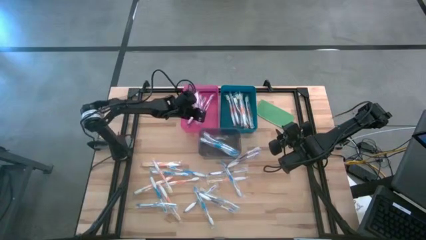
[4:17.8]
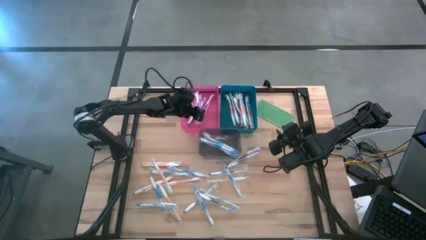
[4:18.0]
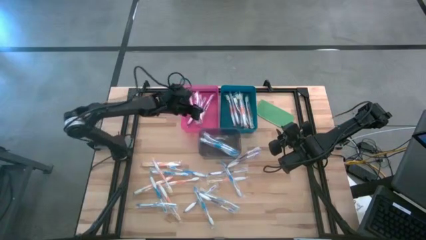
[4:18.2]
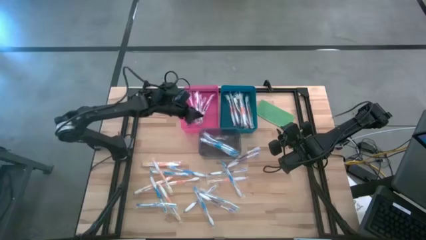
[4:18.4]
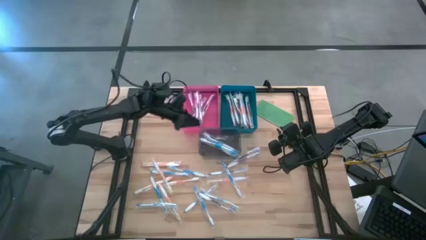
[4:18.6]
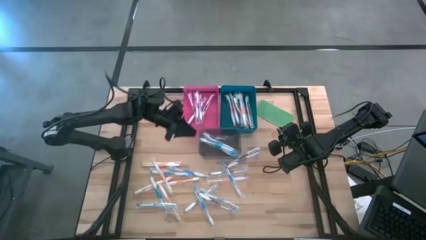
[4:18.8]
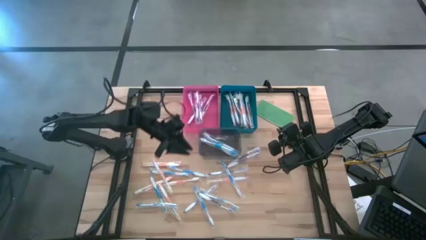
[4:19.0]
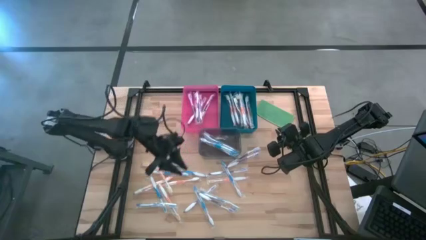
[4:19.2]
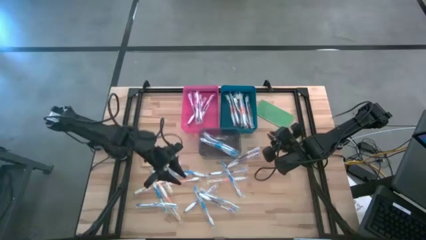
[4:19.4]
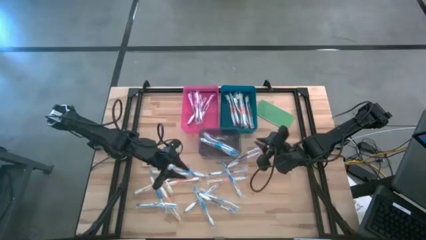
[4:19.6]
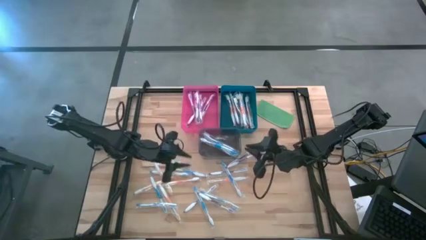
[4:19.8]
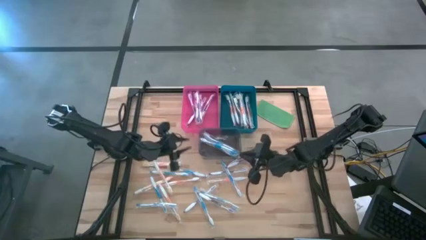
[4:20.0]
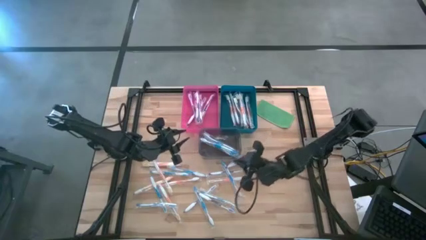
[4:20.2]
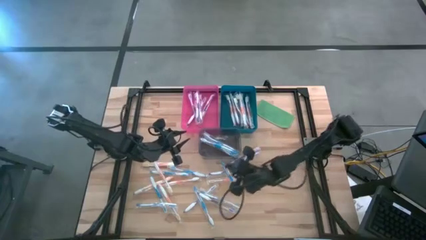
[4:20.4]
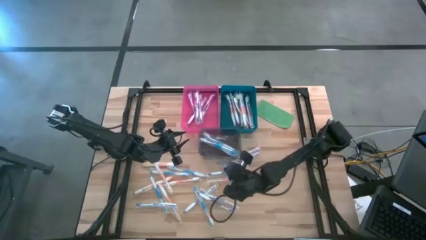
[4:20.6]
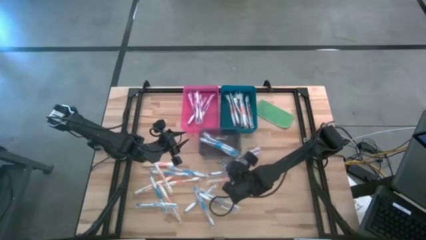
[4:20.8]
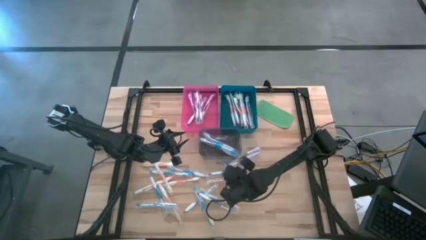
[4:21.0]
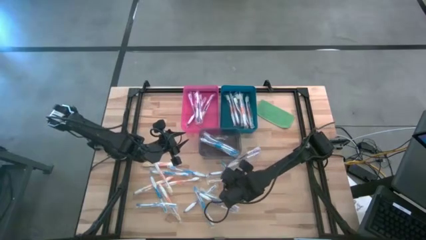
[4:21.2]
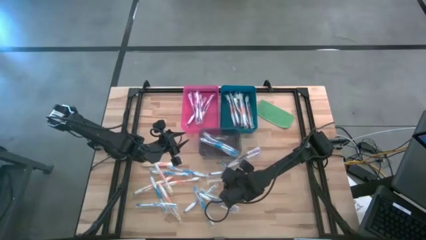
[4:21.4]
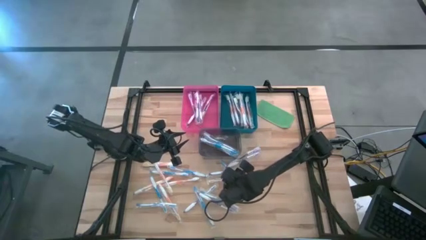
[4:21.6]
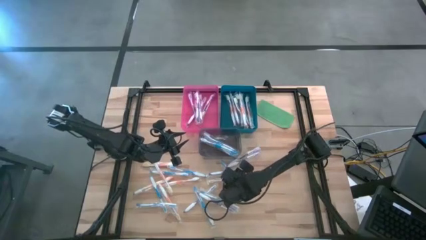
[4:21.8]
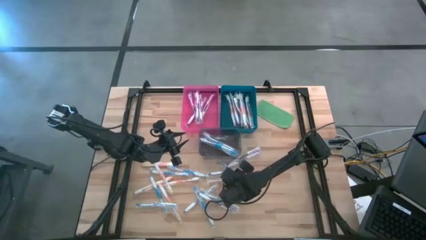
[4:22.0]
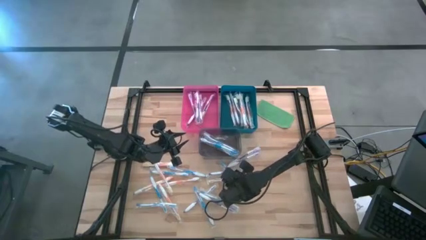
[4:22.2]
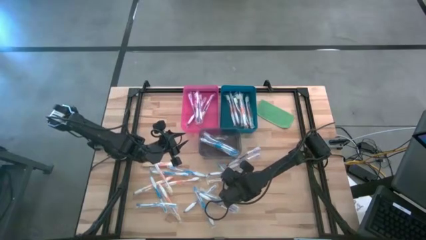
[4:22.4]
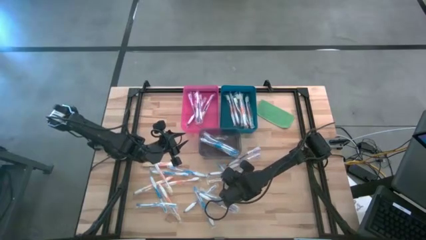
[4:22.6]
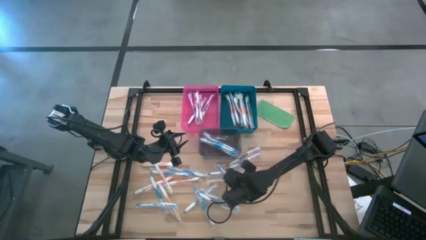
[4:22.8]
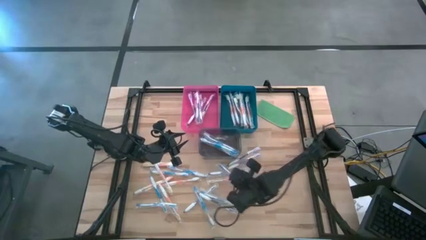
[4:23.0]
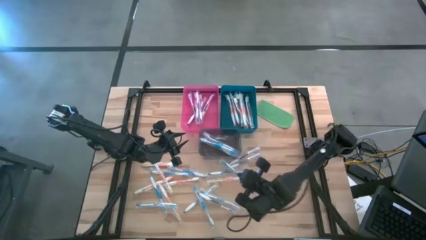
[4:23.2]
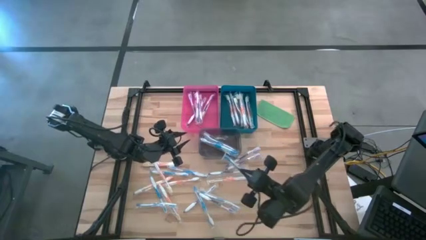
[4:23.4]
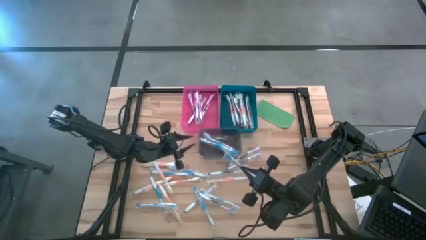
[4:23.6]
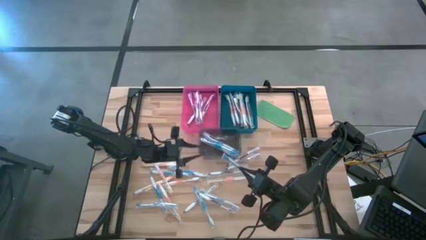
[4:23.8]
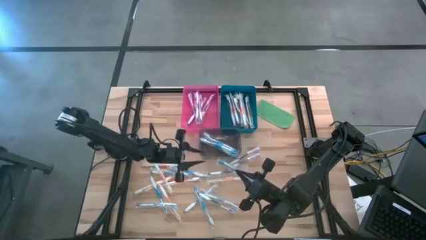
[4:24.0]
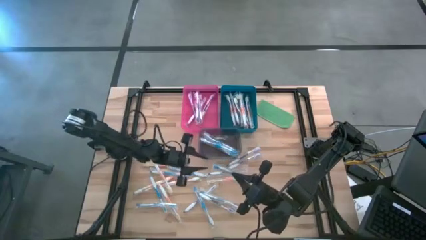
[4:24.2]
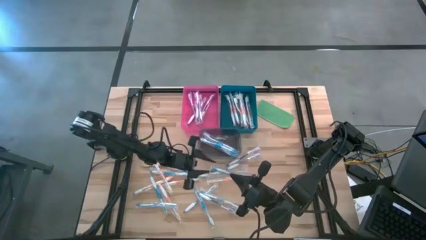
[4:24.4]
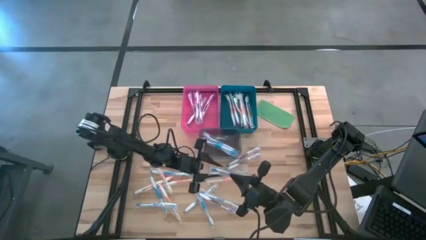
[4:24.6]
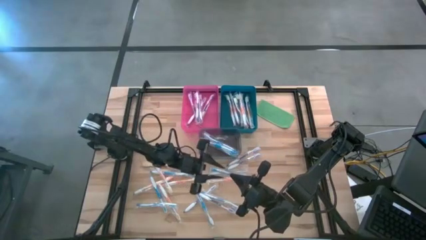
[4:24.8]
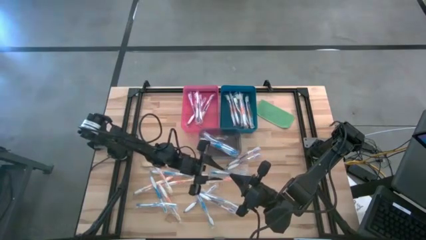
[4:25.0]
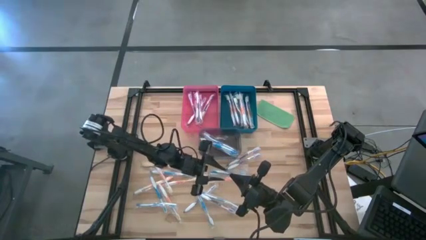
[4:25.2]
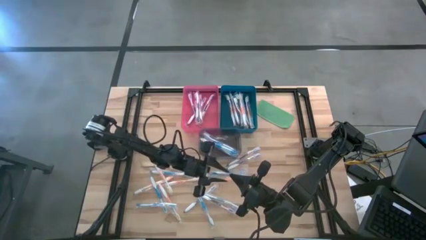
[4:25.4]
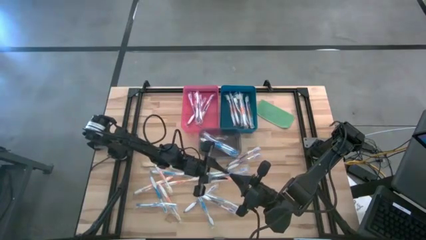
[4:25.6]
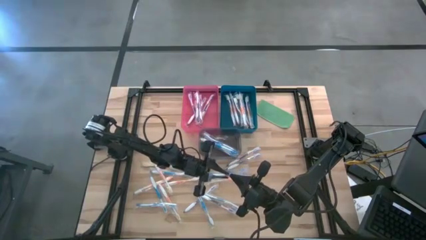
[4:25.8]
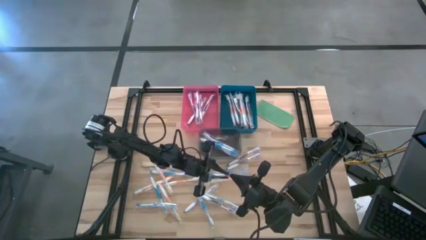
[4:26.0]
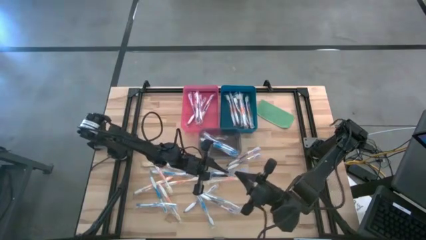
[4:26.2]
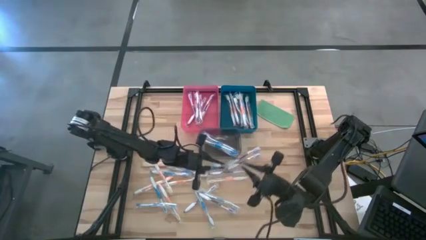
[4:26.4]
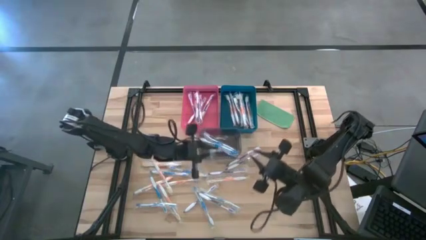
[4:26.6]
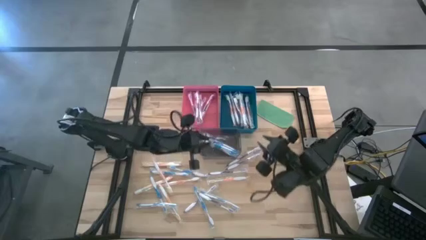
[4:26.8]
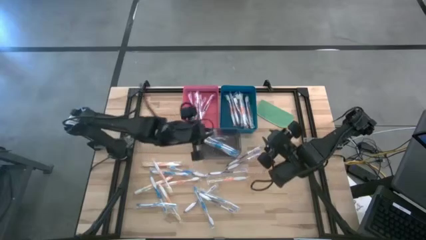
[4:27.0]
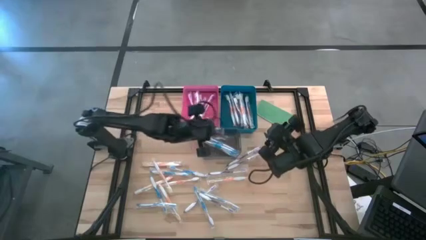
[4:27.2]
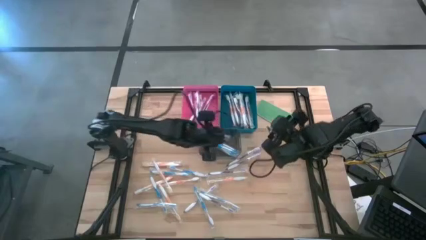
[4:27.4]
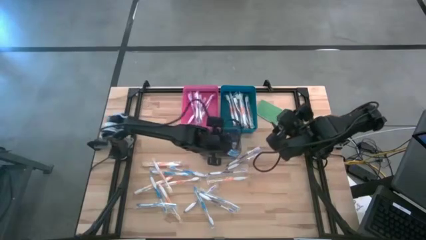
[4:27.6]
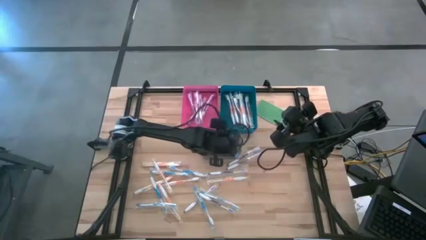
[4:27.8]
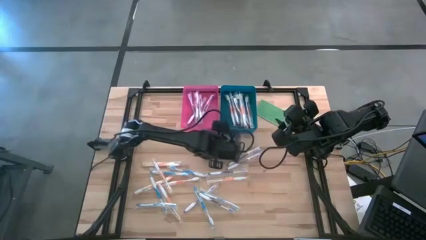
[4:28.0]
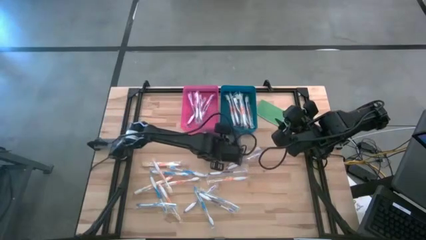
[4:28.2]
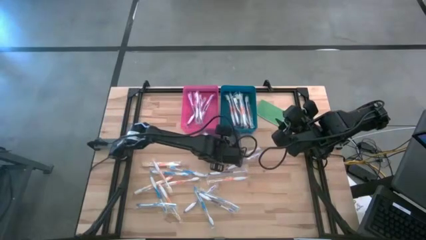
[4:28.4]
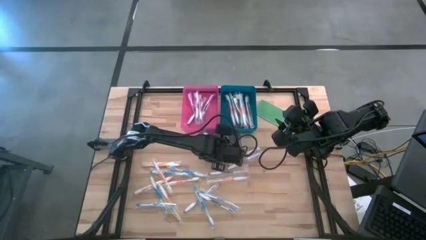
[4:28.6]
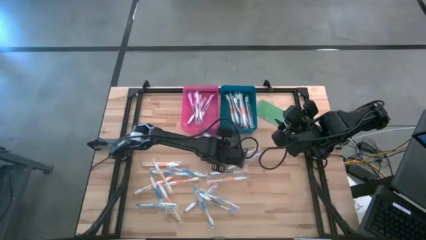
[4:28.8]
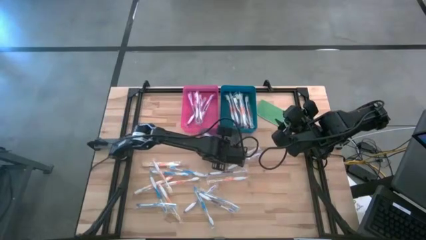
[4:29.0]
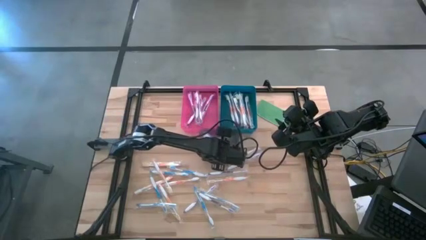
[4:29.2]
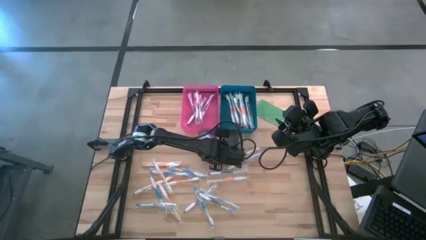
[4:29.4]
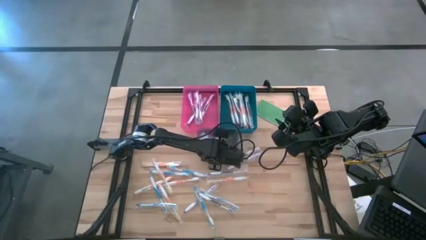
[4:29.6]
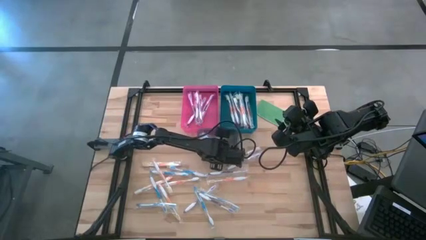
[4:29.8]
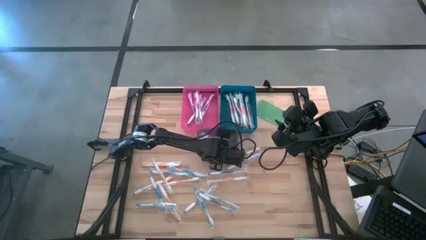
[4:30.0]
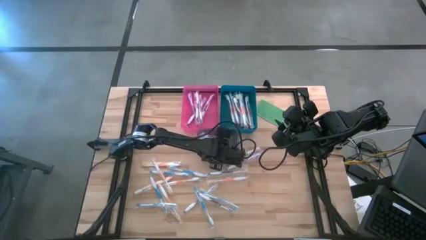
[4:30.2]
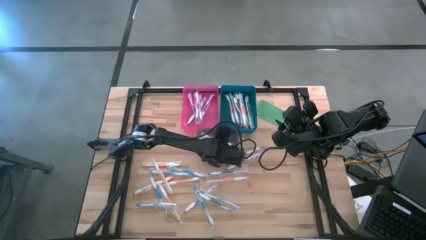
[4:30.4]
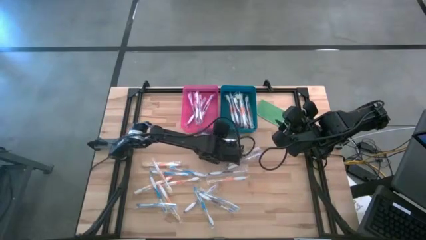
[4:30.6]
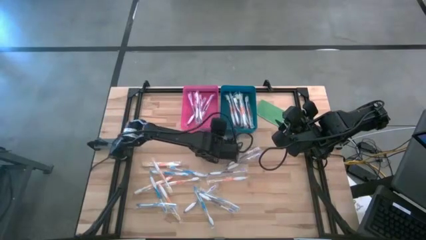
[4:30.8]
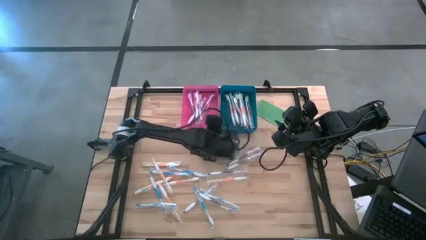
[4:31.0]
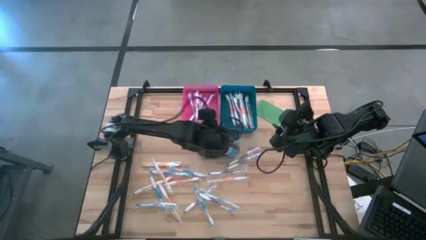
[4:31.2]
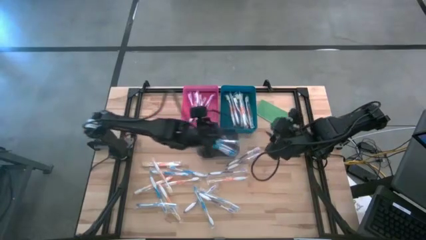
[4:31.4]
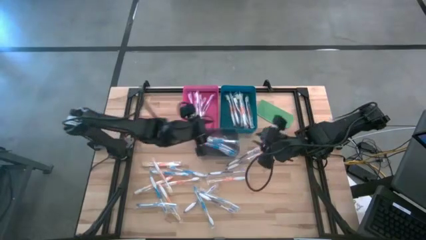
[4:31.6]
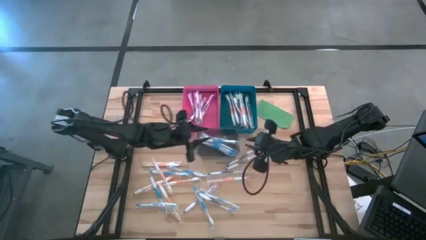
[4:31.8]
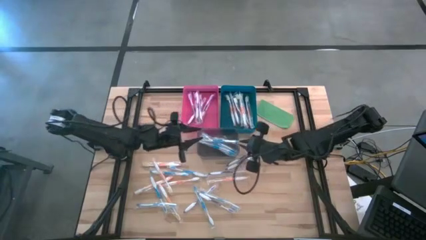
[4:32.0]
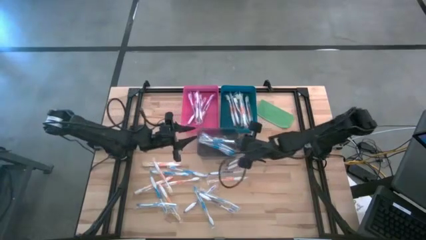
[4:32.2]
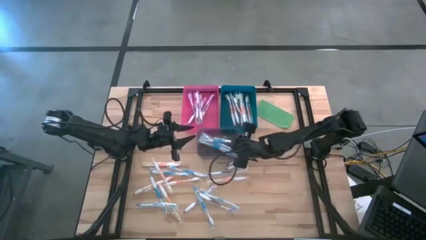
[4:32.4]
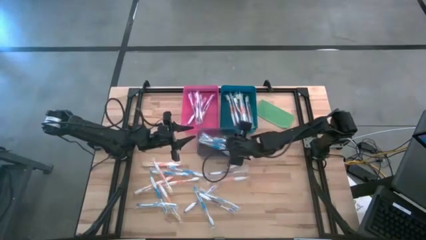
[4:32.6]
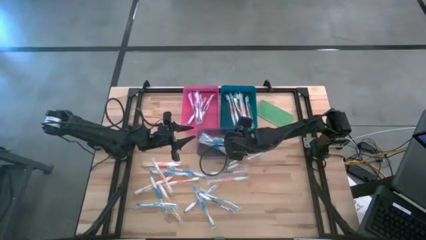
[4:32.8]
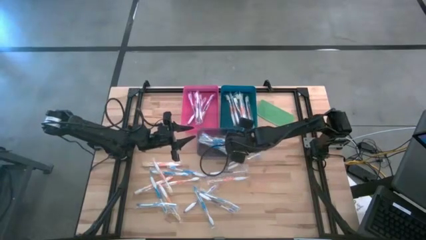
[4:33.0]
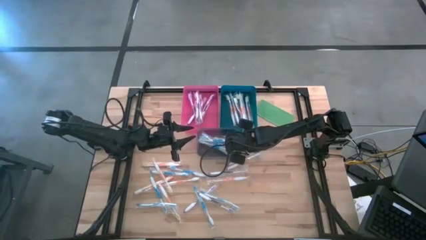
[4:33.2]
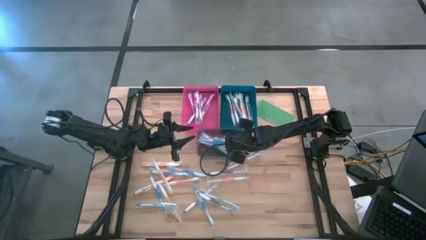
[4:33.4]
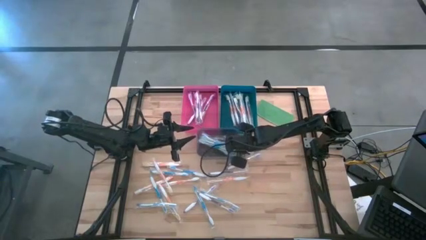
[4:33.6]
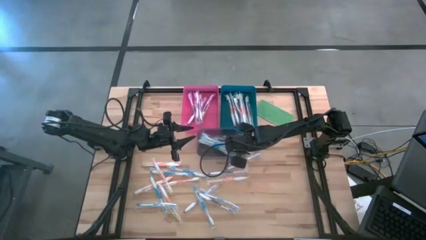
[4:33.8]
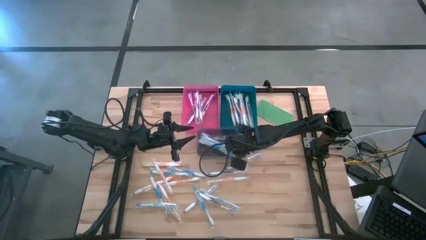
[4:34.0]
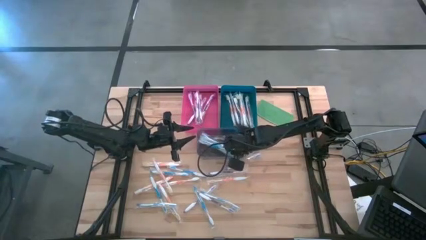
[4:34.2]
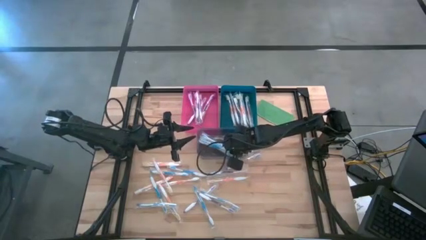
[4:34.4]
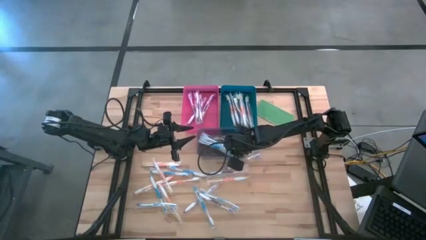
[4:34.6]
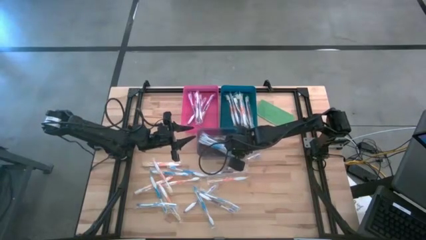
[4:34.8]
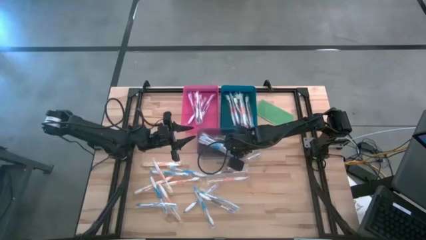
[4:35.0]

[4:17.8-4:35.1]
Task: Pick & Place Toothbrushes
Put the blue toothbrush into the transparent gray bin
